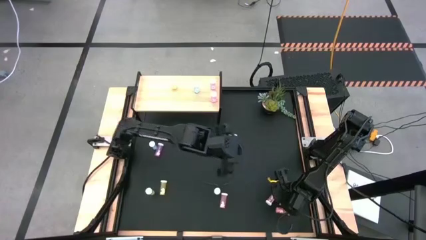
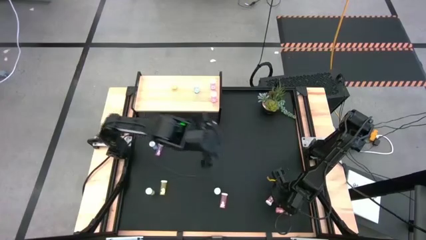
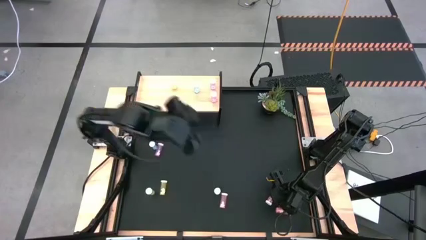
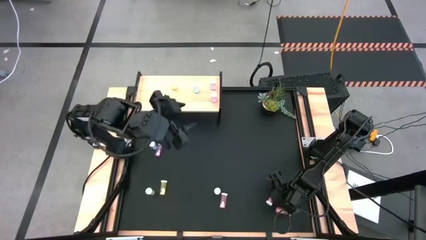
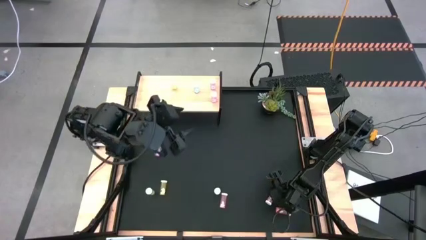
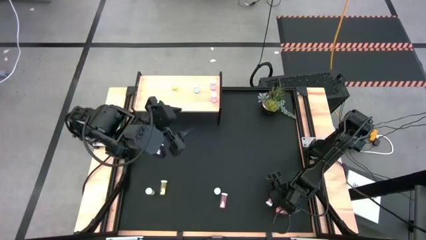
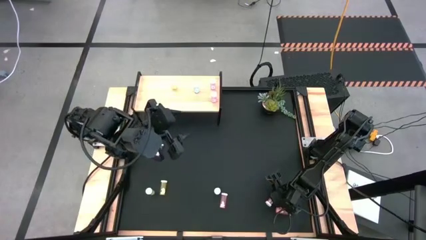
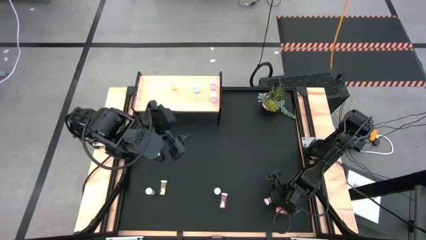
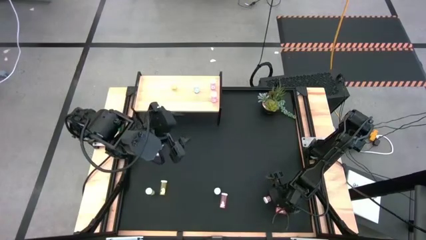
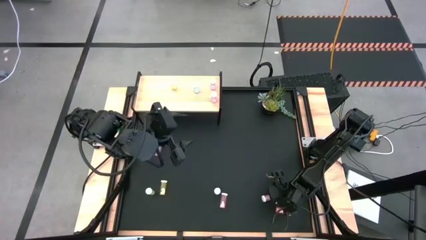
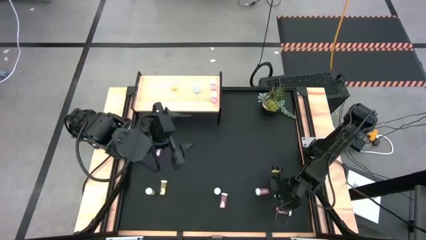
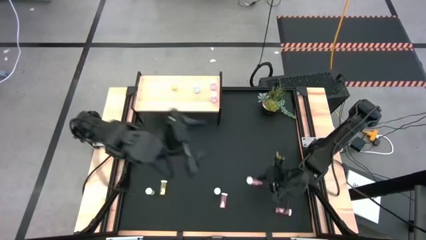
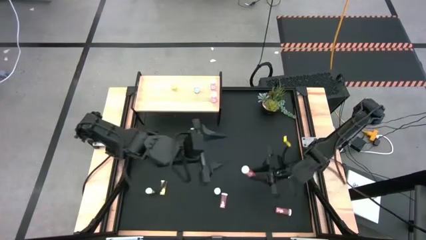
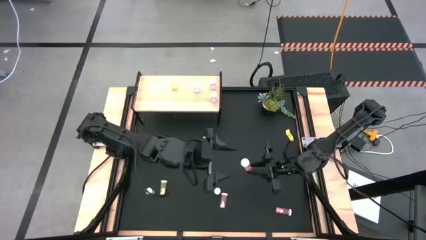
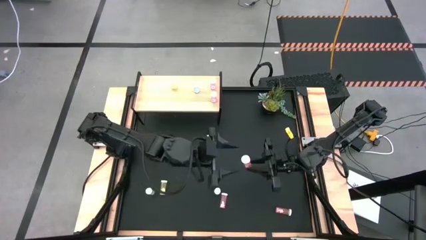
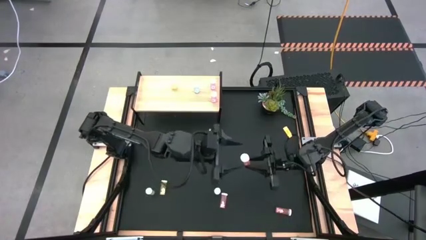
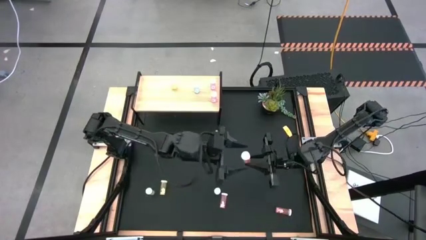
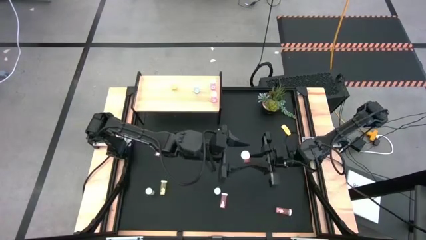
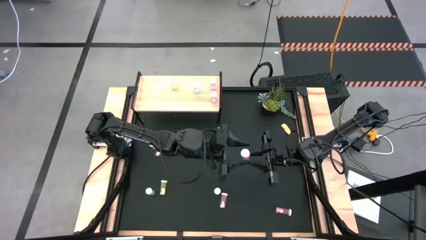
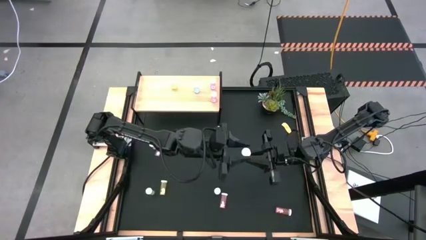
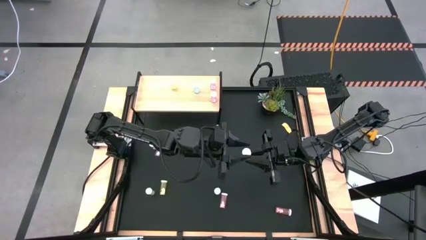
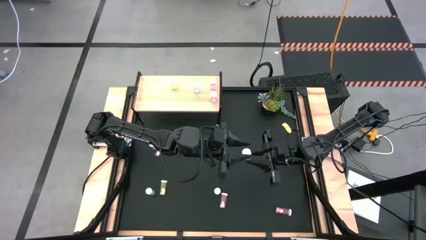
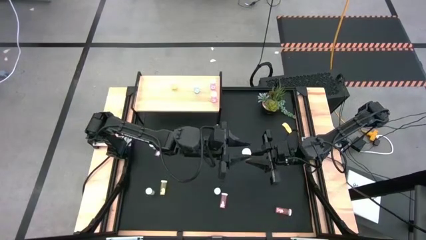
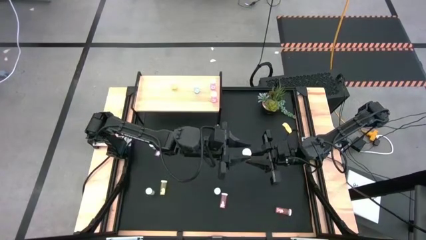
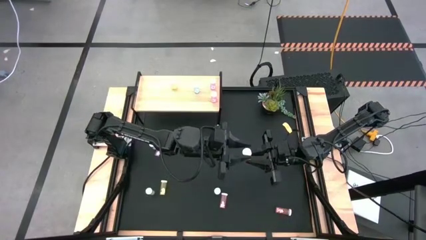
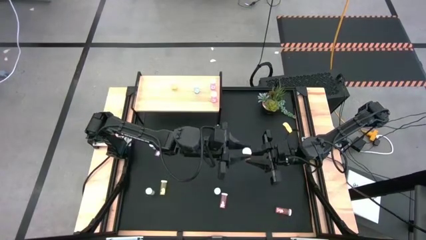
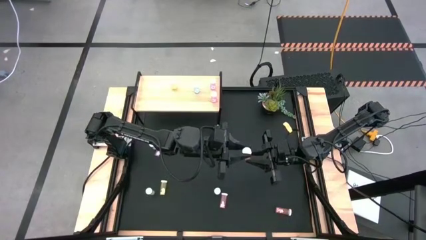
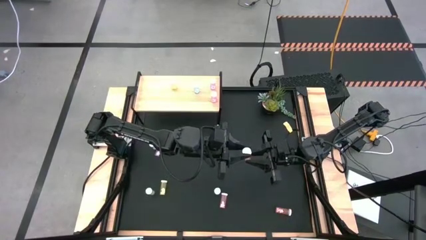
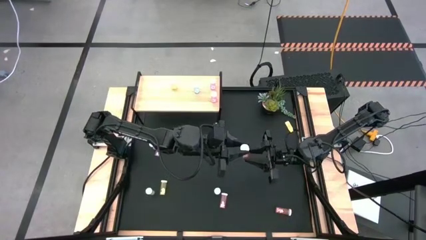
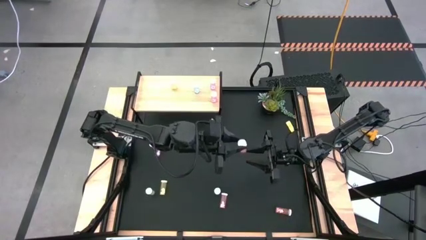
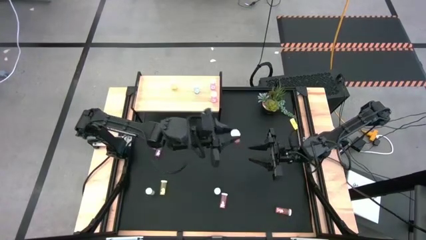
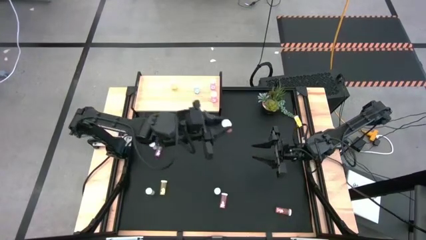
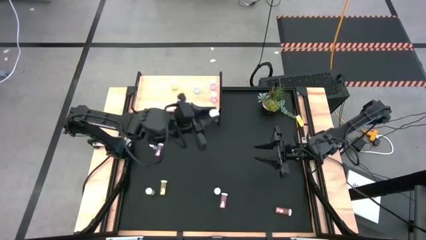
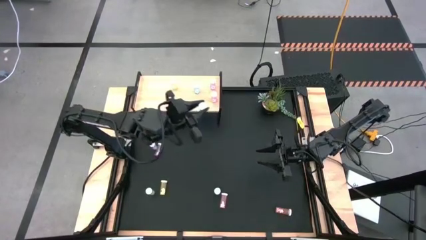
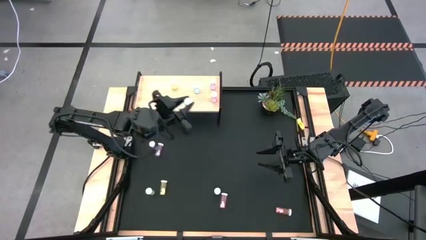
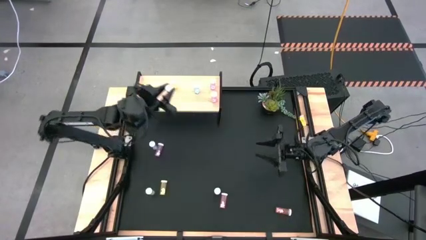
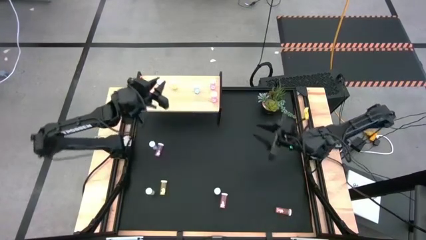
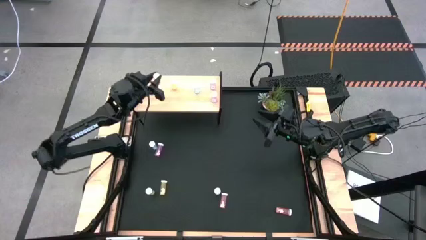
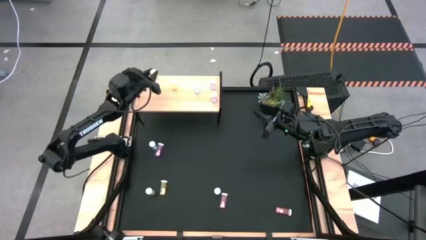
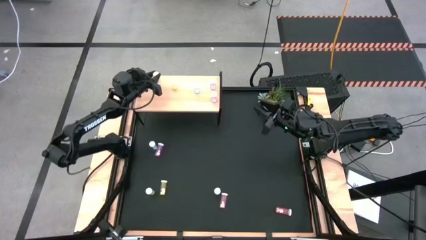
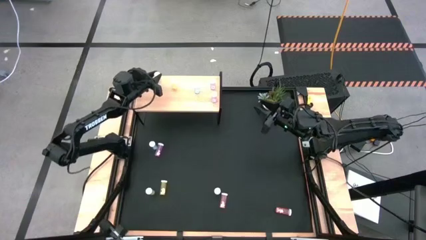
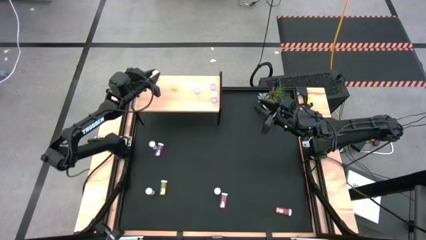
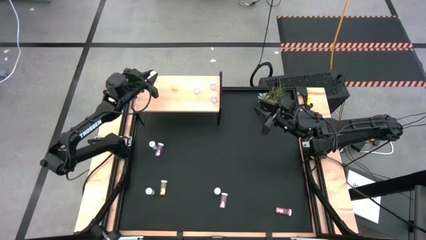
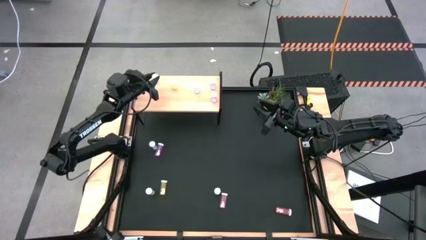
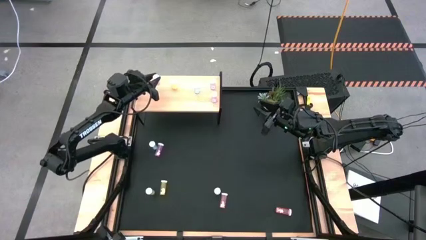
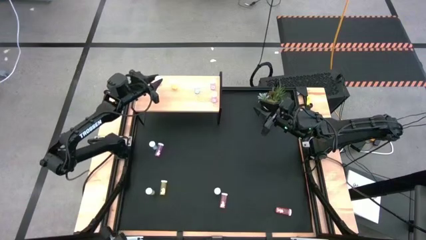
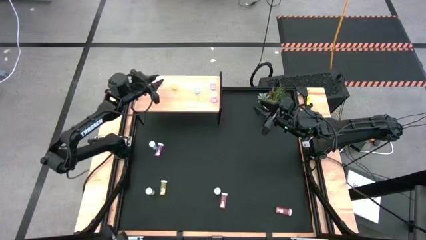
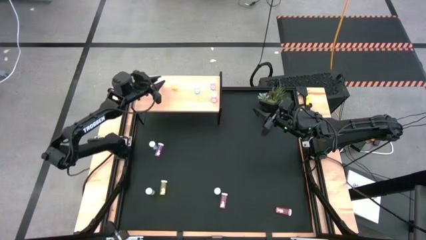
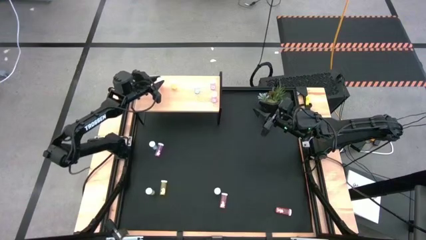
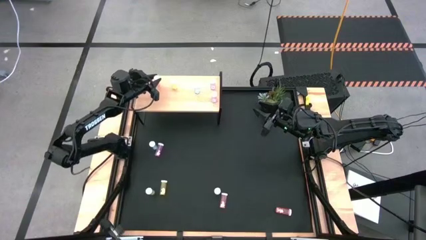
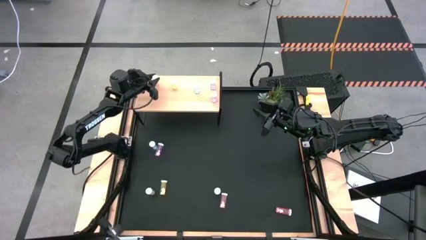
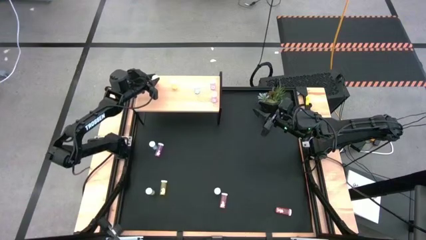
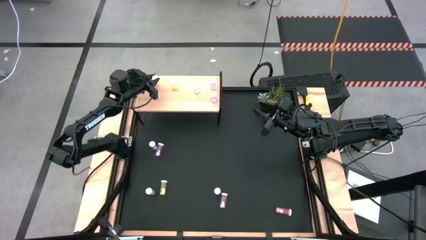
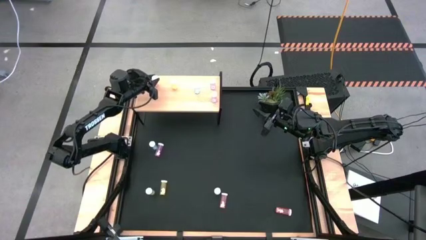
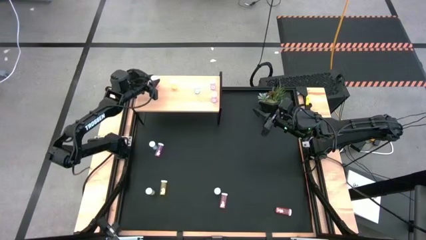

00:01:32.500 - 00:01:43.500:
Task: Pick and place medicine bottles onto shelf by color
Put the top right orange pill bottle on the shelf

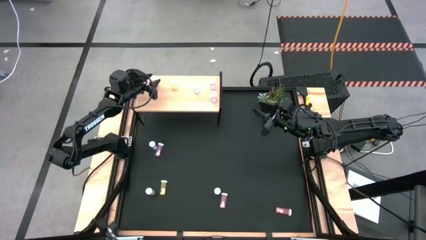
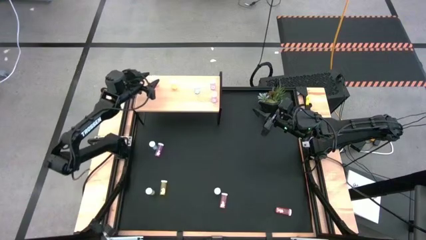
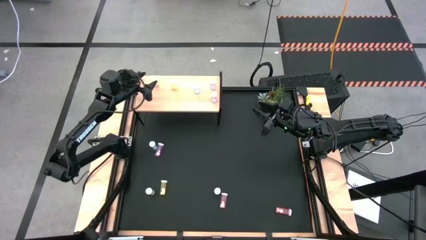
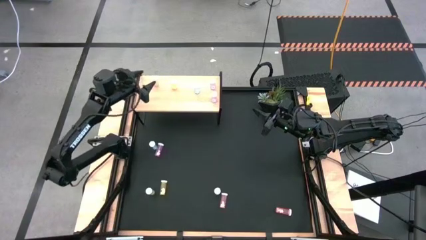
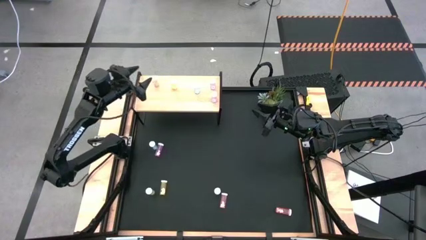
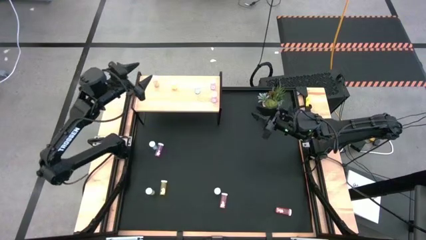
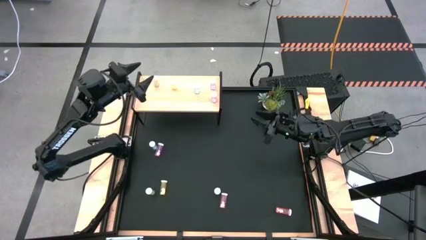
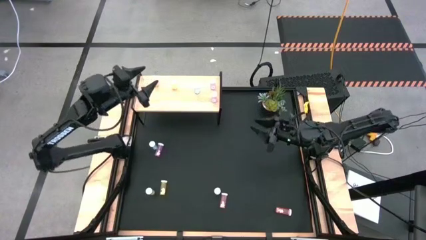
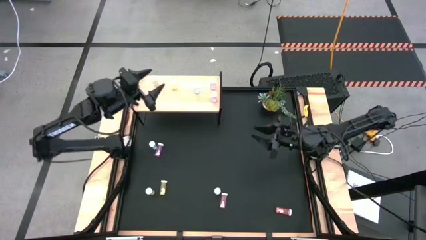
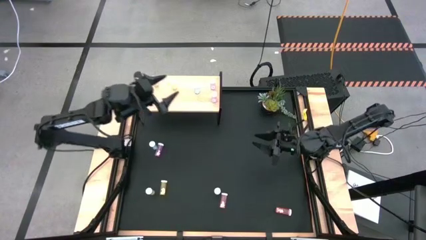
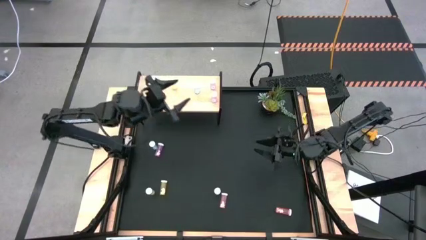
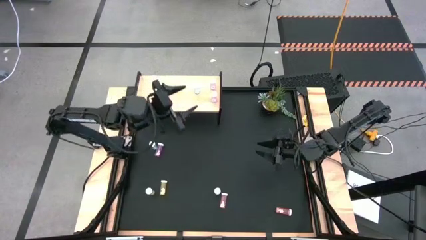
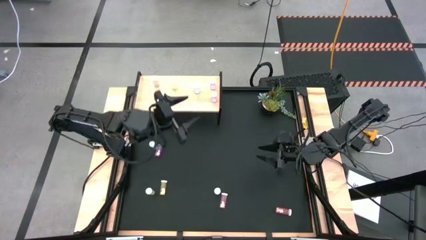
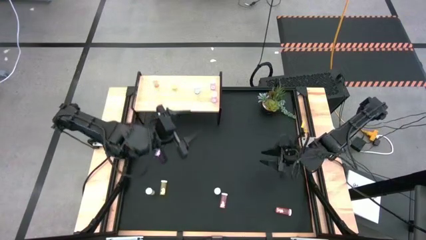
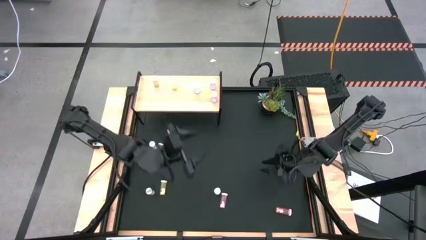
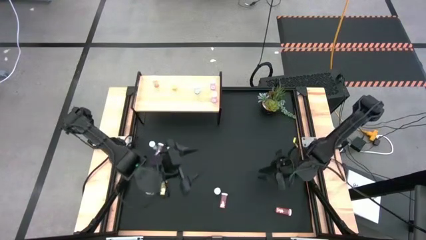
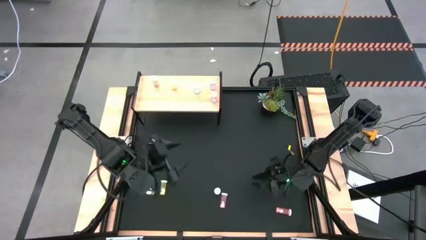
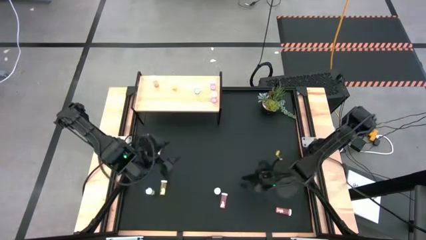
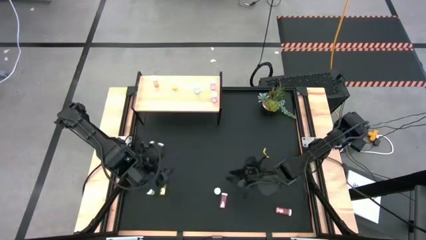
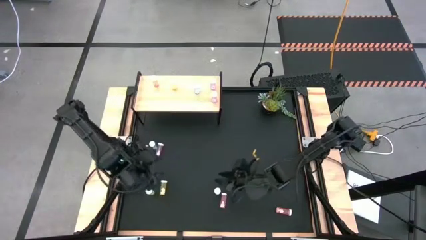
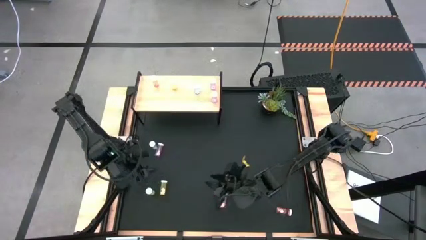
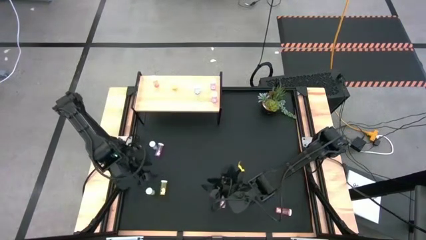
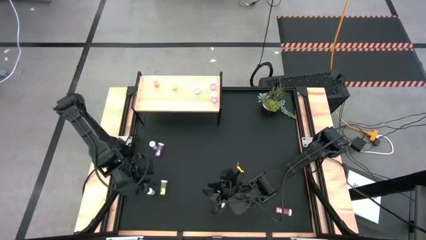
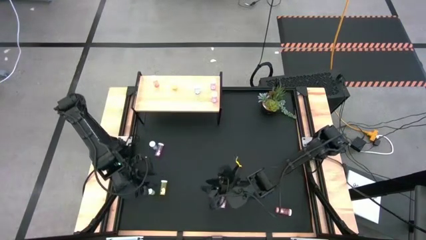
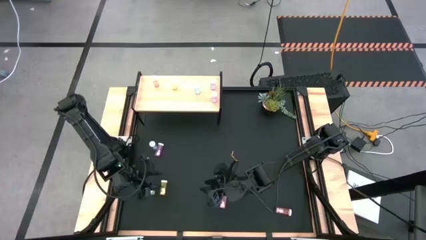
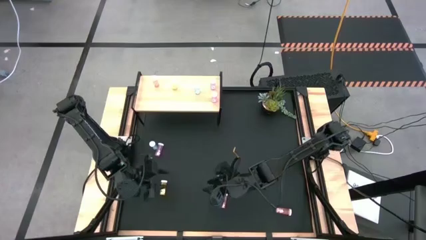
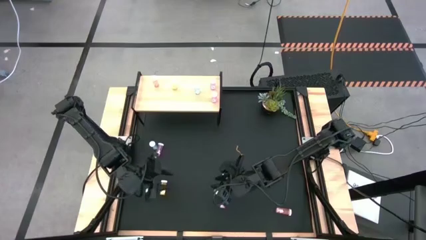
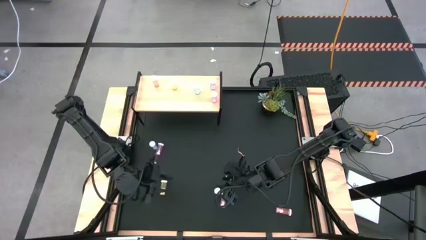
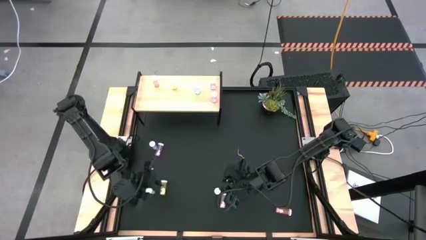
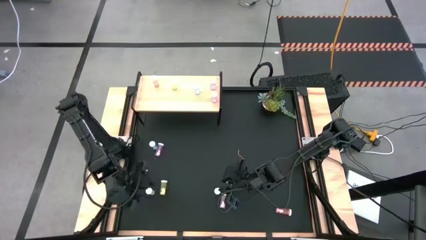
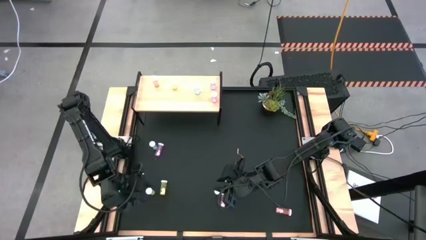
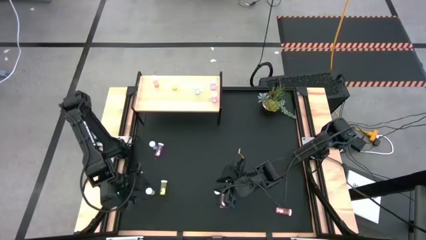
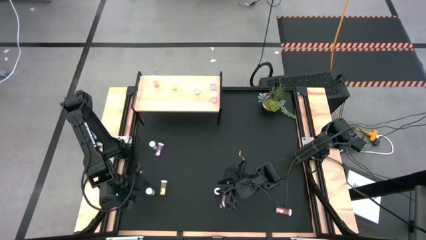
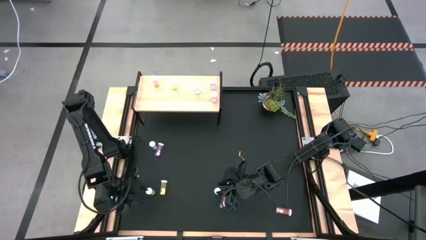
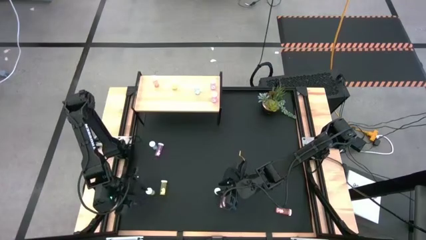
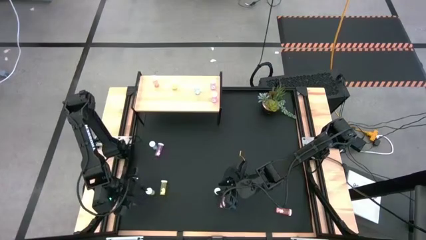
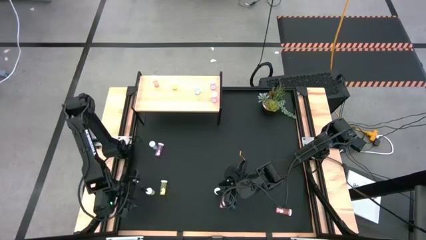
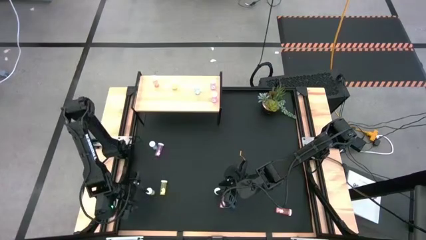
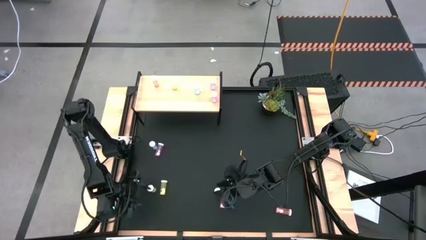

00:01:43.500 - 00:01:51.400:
Adjust the yellow pill bottle on the table
